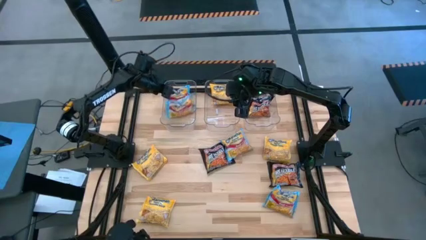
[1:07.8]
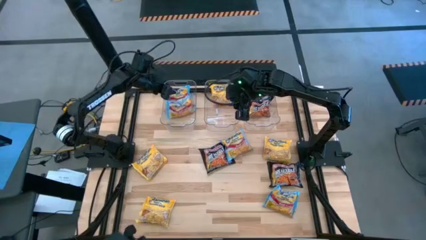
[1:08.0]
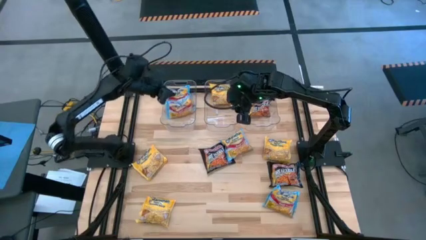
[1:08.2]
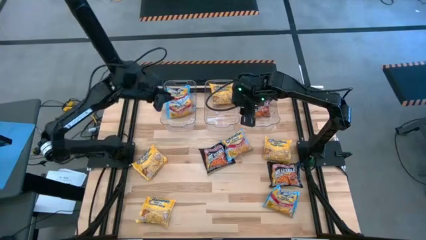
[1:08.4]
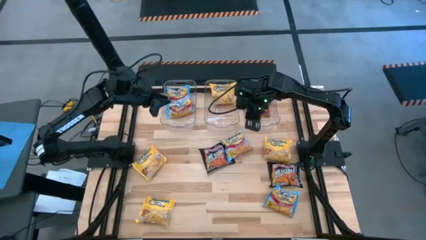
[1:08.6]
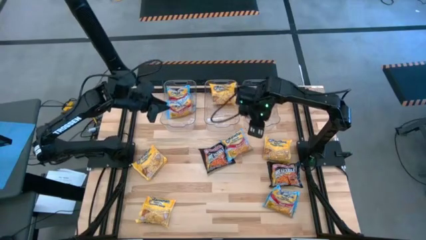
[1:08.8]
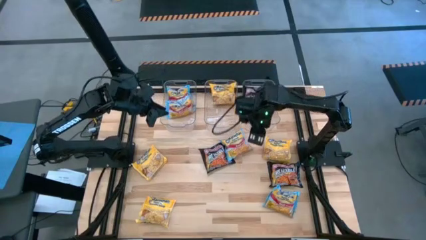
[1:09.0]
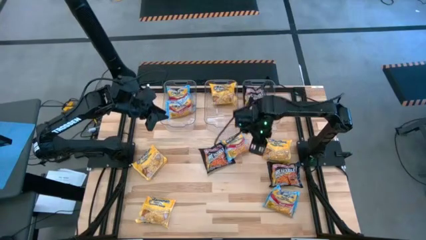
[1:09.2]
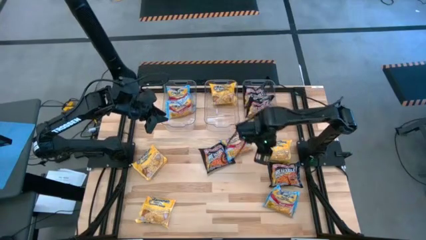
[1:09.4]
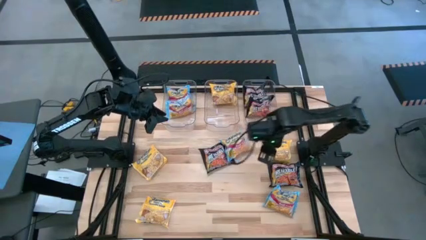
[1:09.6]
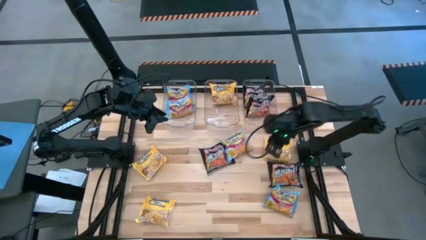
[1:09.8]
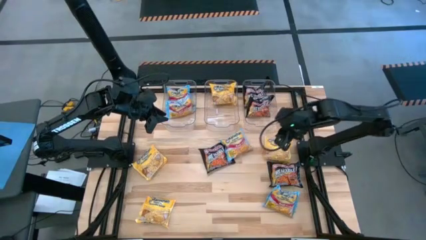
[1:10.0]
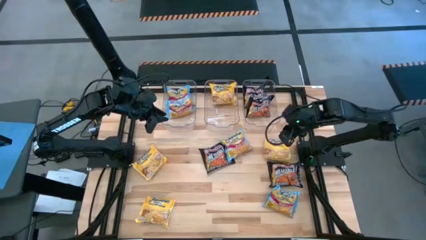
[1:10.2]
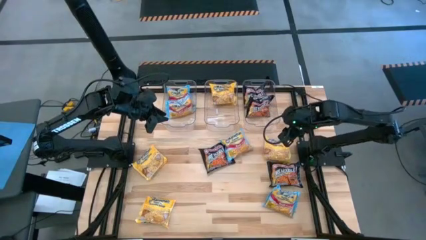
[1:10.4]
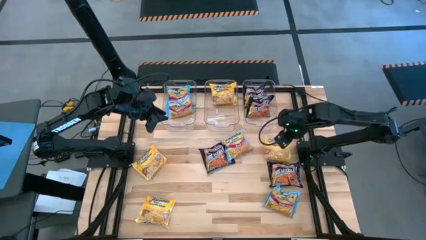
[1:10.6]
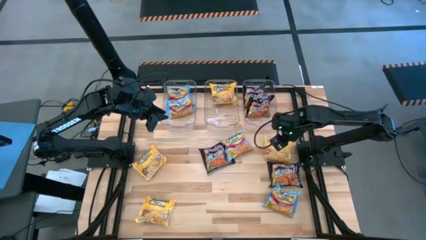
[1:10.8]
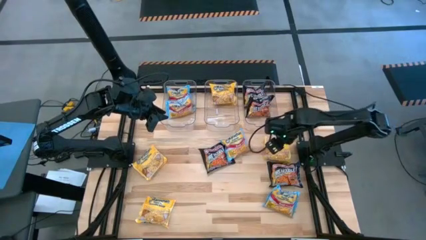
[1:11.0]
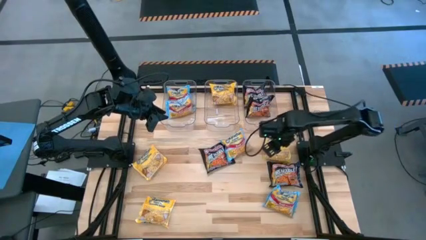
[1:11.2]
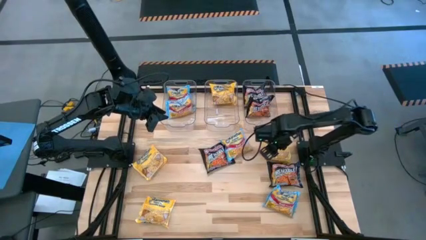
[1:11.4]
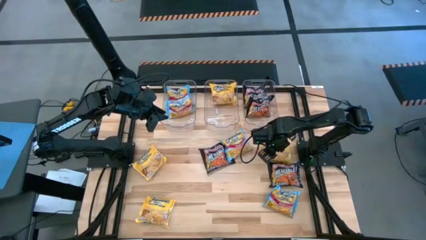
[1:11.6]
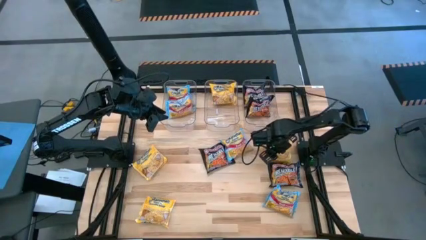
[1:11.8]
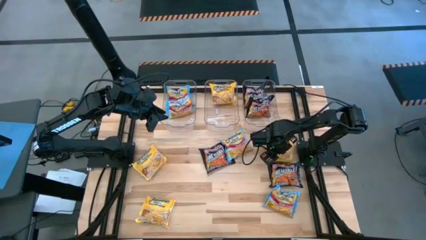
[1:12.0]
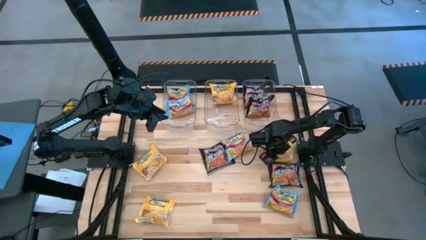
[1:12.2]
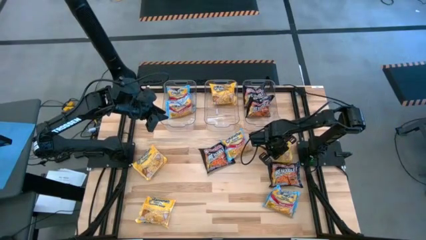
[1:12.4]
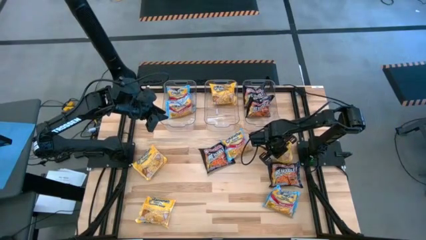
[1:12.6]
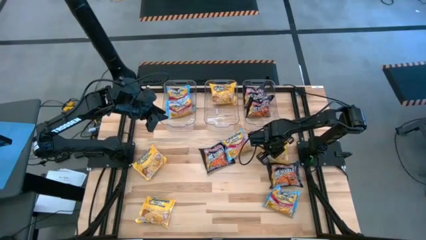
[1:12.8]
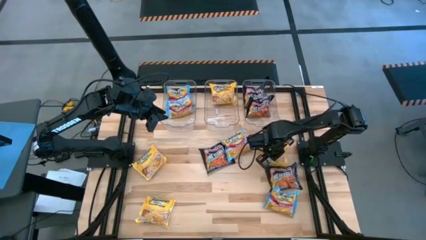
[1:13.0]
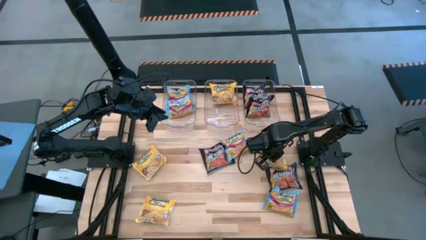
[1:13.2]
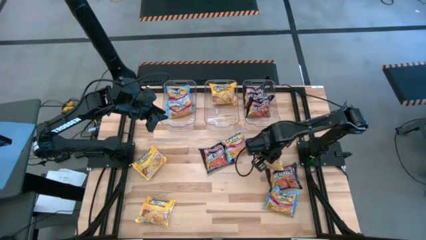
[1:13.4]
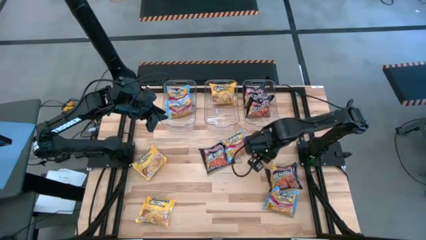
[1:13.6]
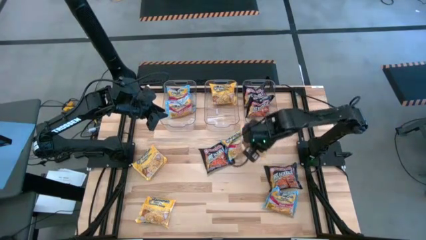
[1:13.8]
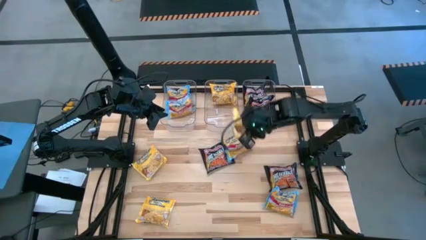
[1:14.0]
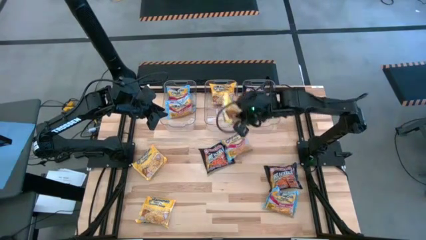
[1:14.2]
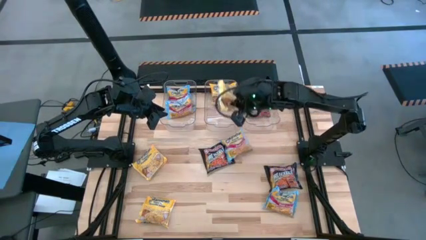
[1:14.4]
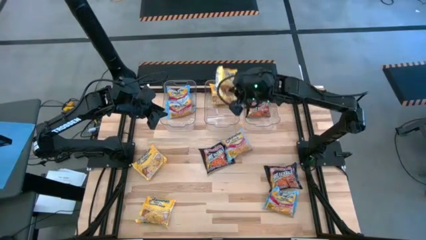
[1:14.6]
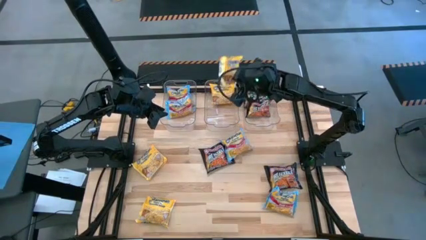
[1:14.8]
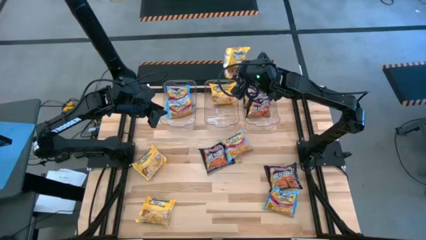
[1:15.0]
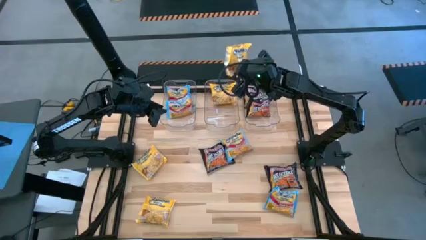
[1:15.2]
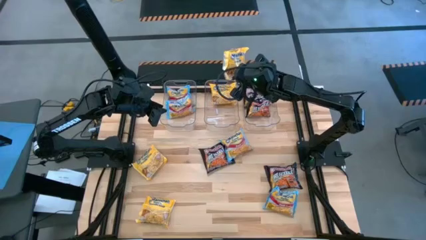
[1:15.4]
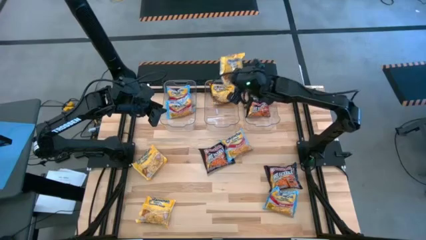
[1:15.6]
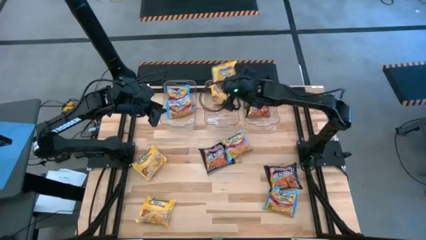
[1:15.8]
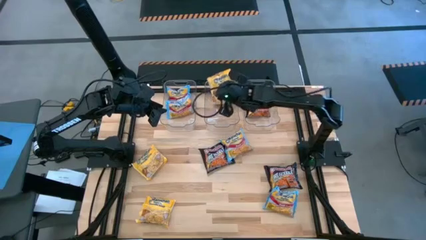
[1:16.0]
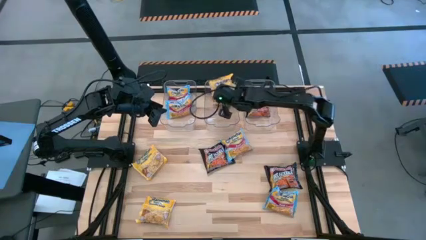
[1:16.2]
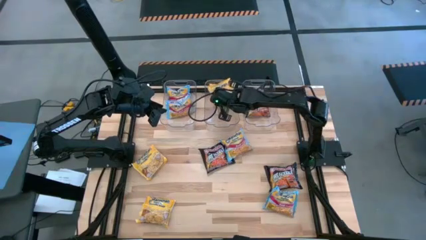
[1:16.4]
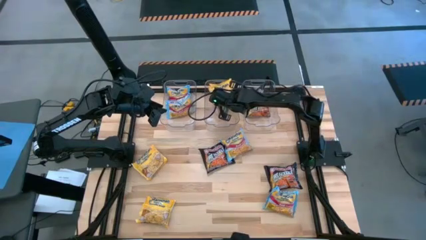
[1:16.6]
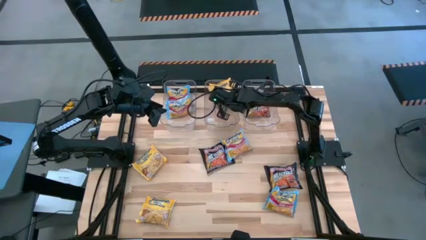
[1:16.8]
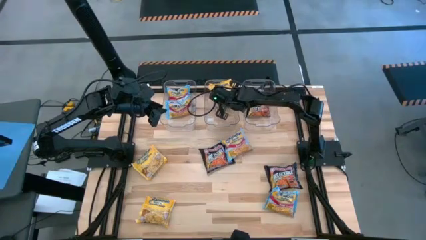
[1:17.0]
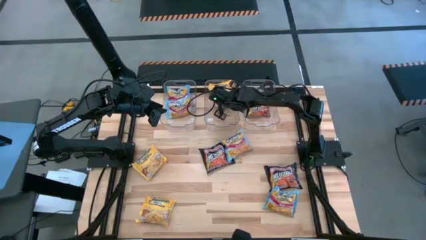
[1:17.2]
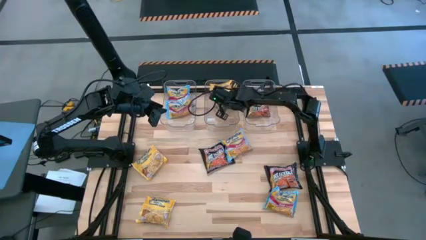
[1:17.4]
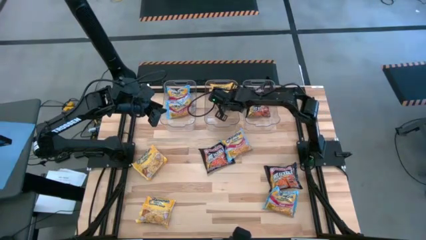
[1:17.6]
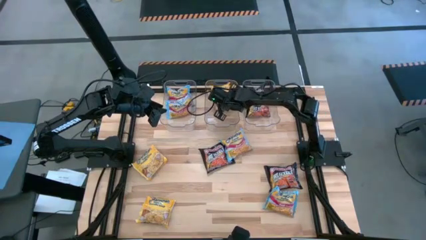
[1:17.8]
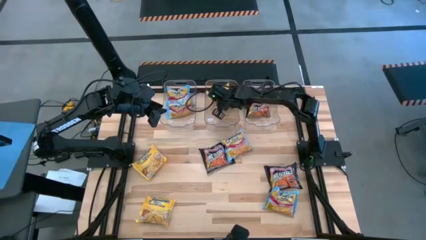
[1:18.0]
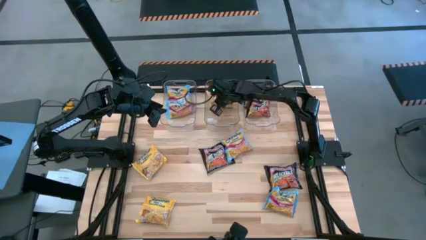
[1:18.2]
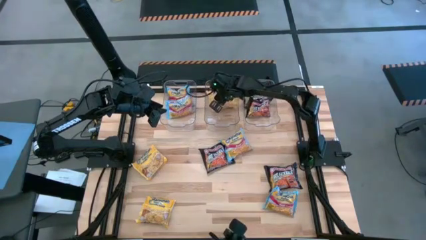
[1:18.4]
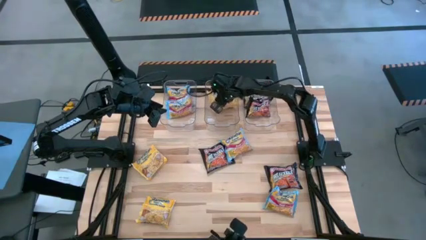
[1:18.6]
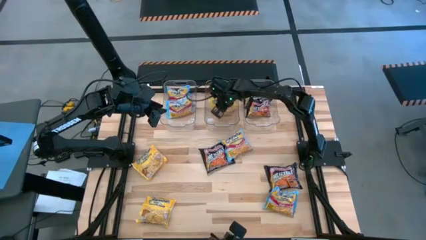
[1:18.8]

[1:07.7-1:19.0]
Task: Sort Maruchan noodles
Put the yellow noodle pack into the middle transparent bin
